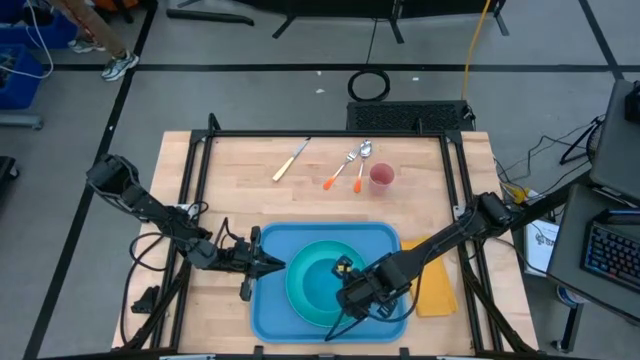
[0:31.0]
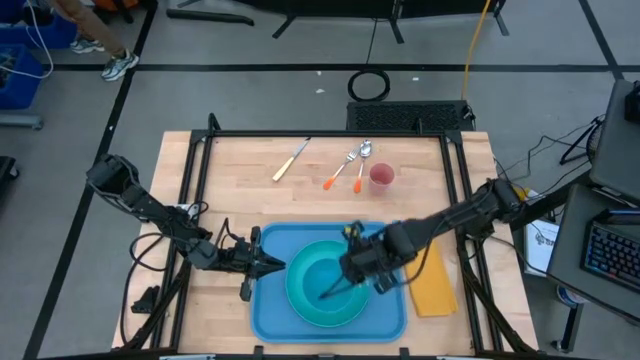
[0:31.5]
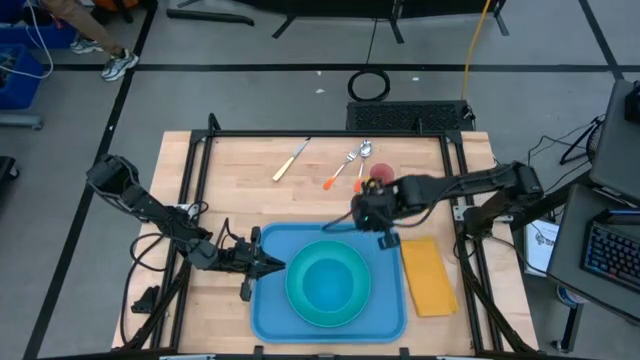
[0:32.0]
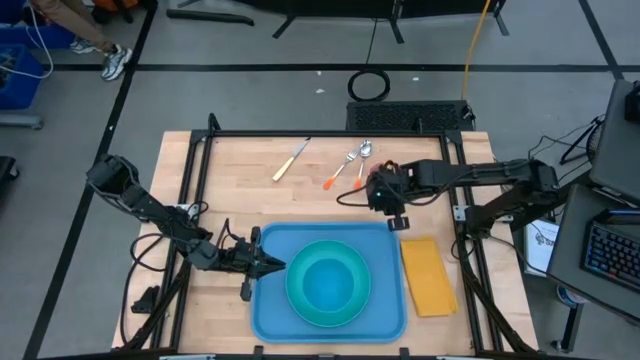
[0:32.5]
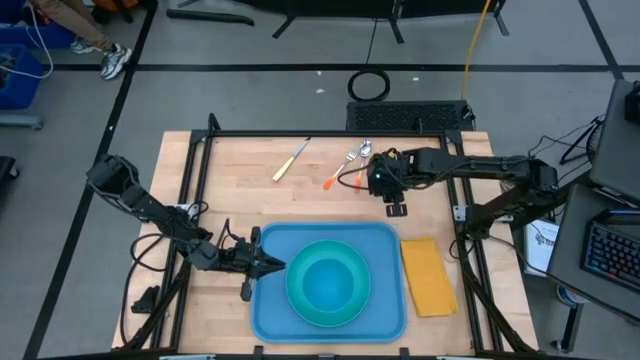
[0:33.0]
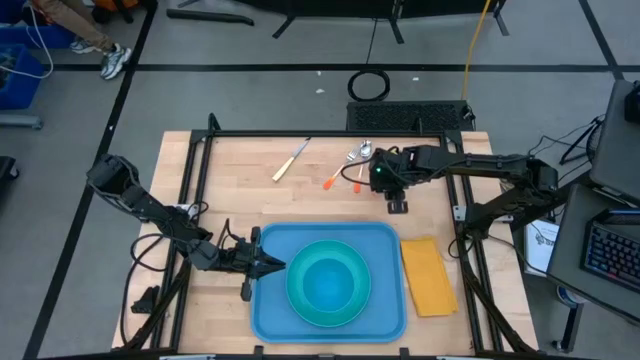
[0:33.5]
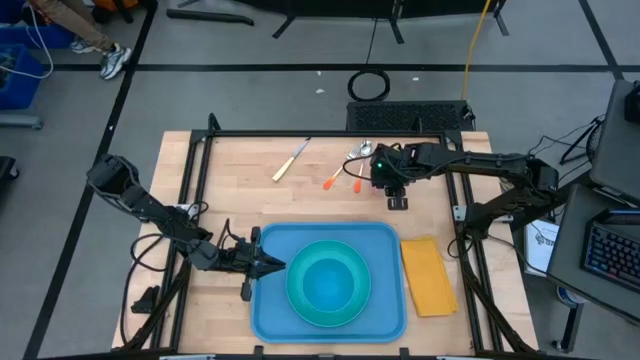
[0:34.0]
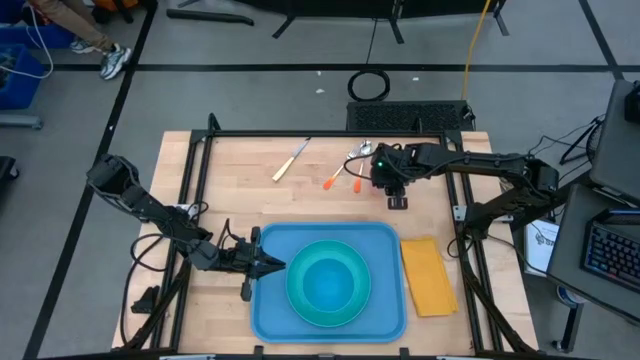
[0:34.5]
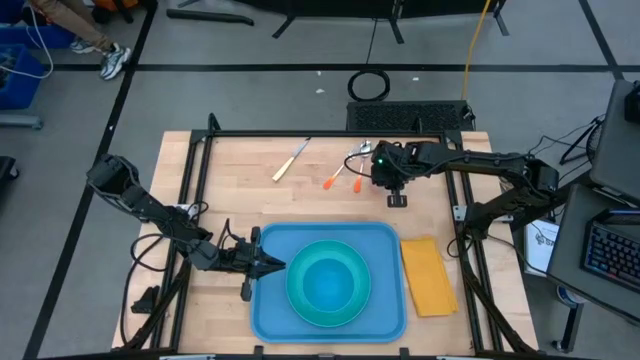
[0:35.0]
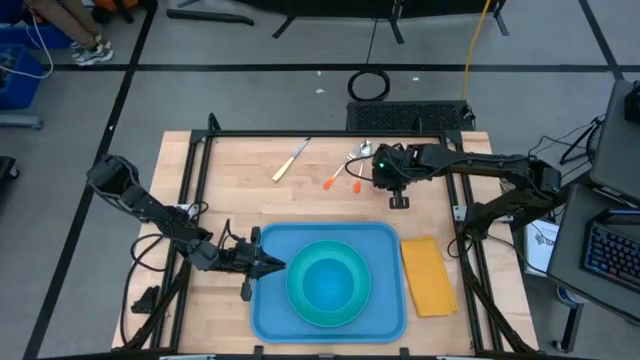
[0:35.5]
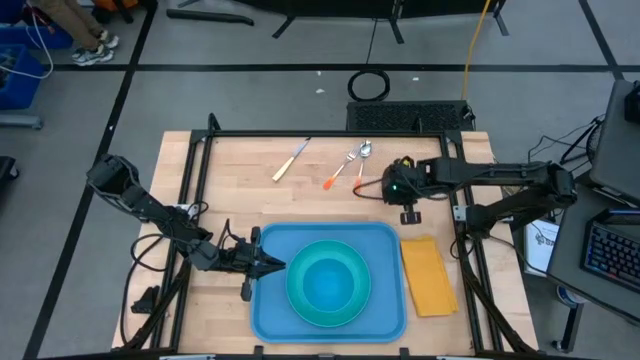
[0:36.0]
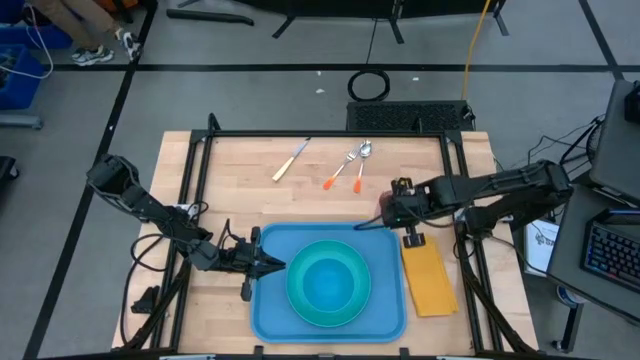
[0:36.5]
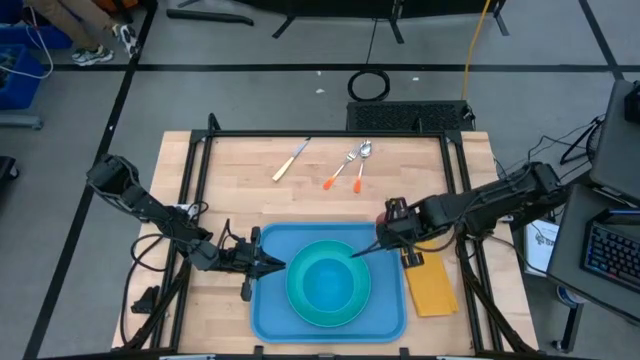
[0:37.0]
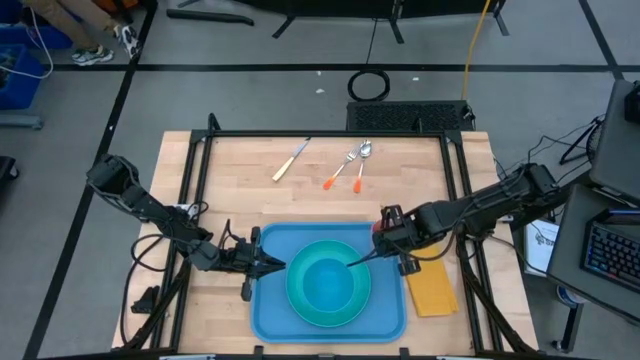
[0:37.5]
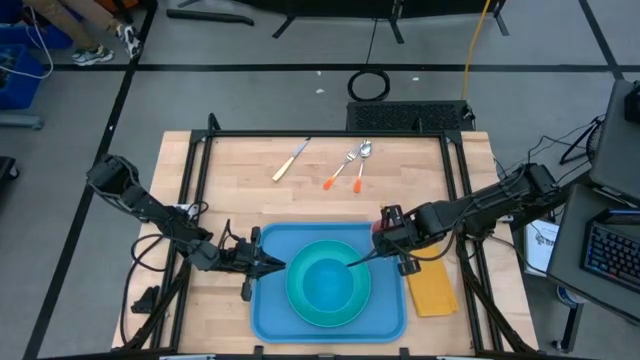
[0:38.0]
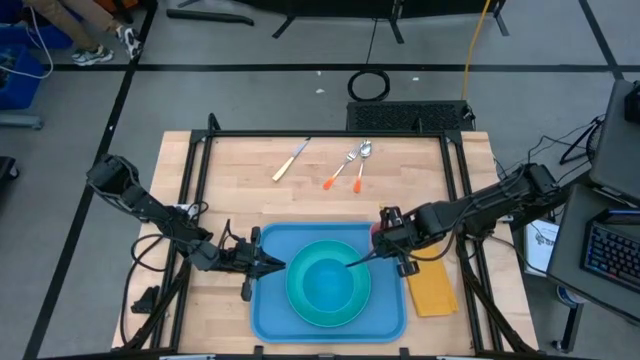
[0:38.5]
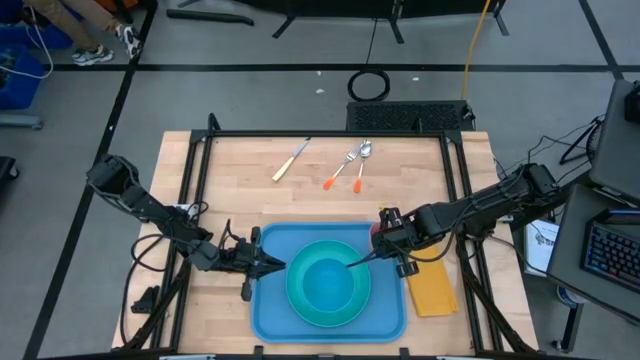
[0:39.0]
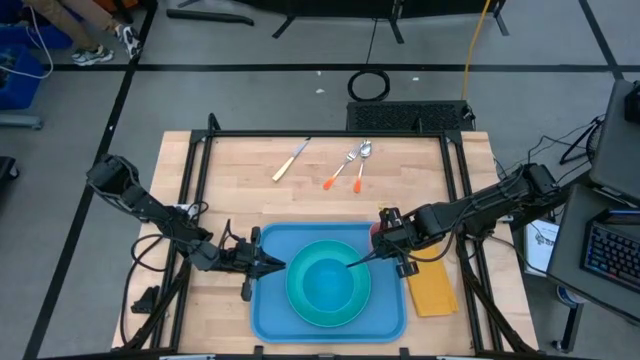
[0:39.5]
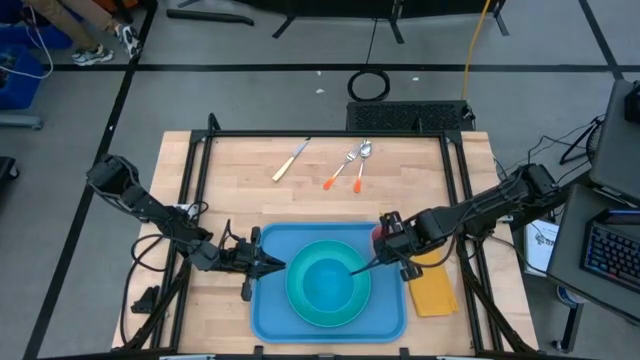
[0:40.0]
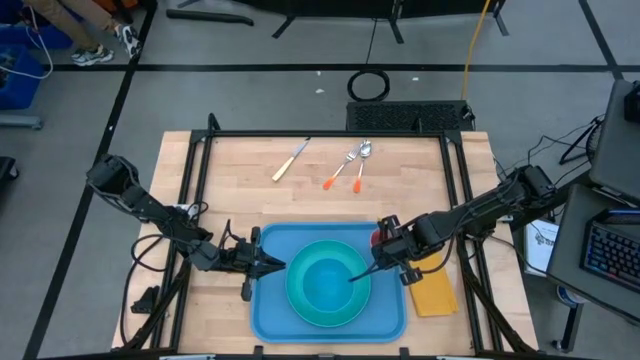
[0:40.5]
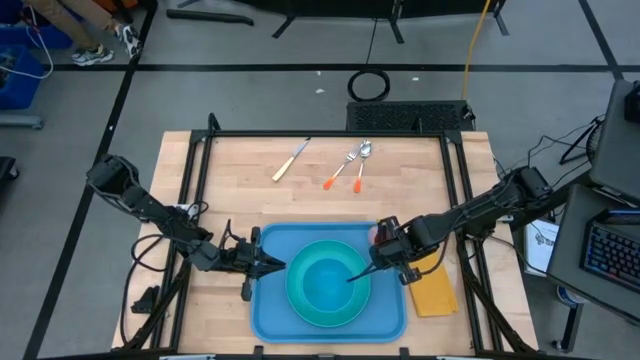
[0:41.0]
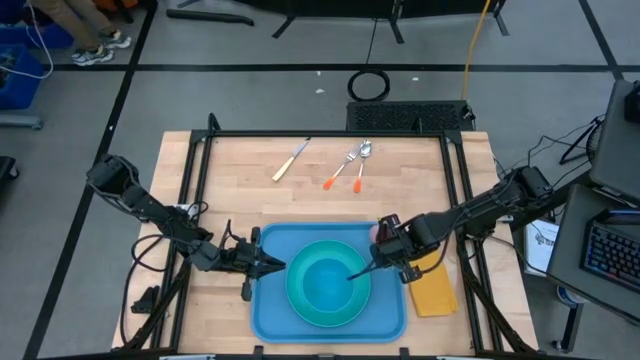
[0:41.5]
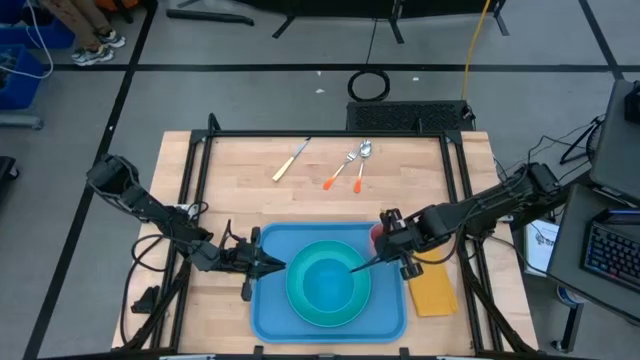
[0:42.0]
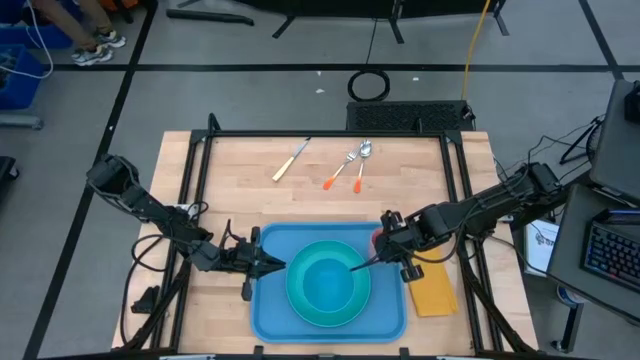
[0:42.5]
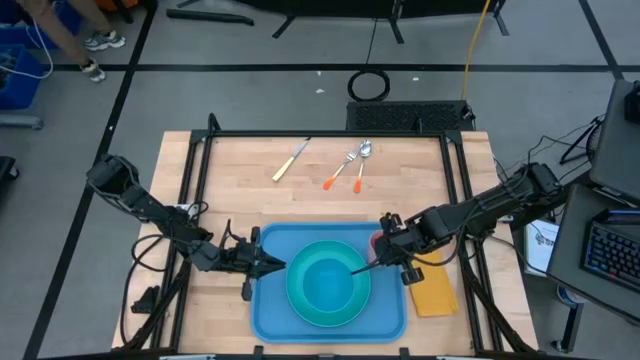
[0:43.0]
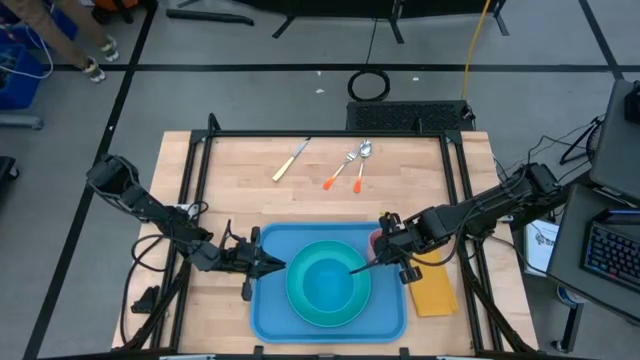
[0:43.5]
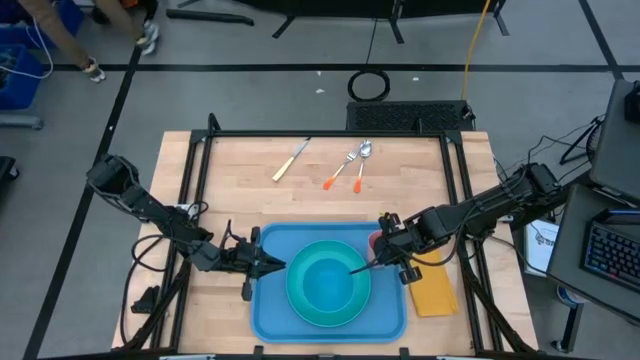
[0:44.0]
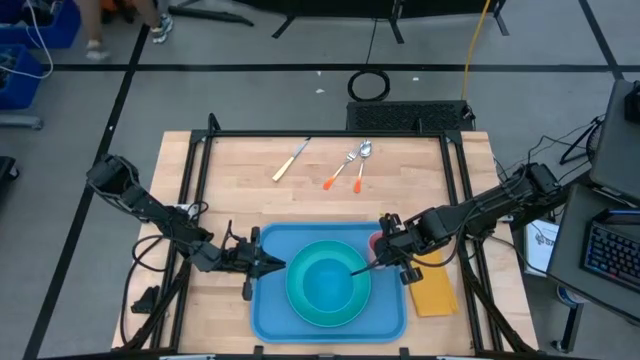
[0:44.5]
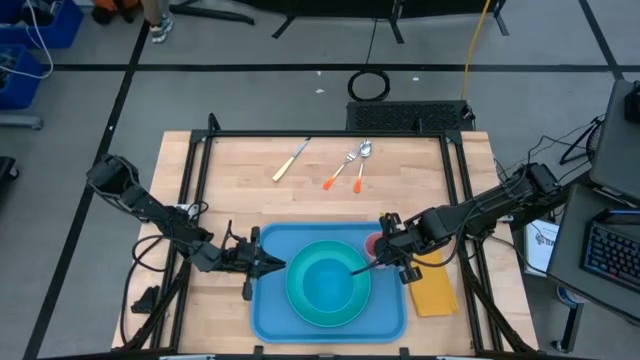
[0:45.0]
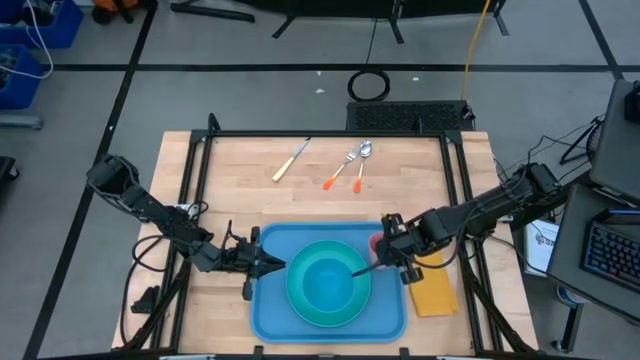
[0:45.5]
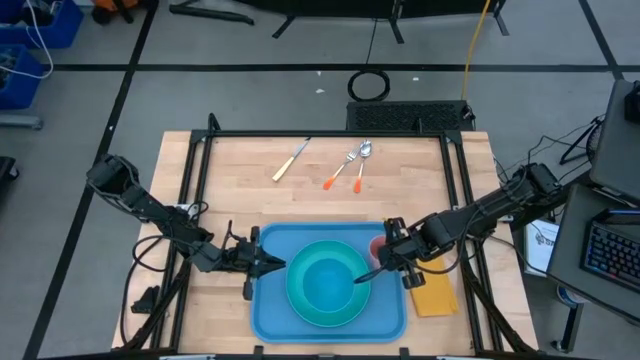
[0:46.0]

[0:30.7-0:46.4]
Task: Set up tray
Put the pink cup on the blue tray to the top right of the light blue plate

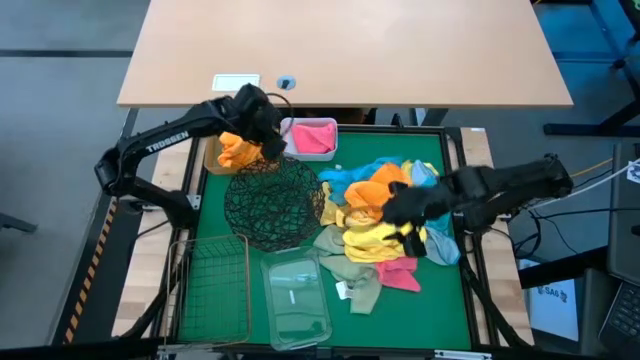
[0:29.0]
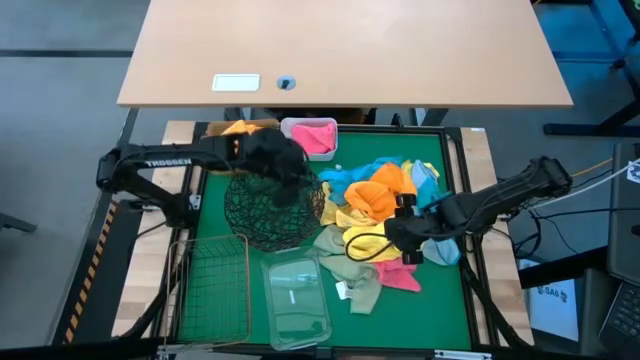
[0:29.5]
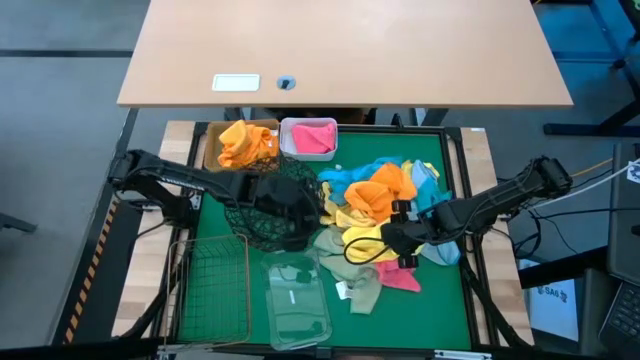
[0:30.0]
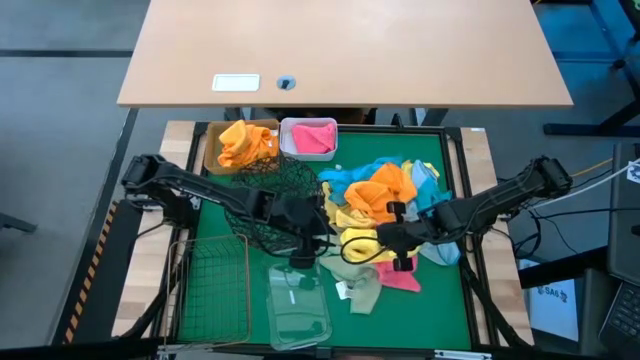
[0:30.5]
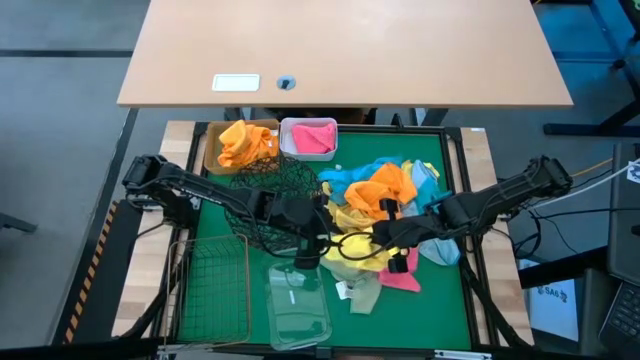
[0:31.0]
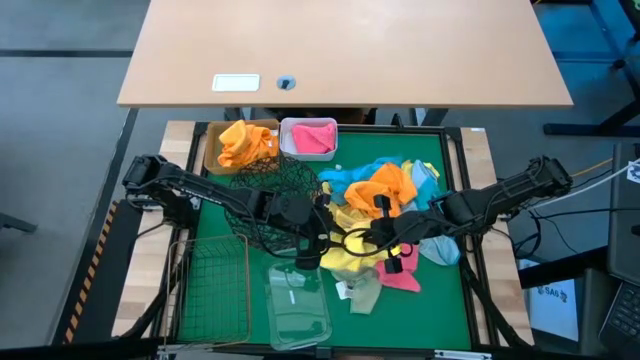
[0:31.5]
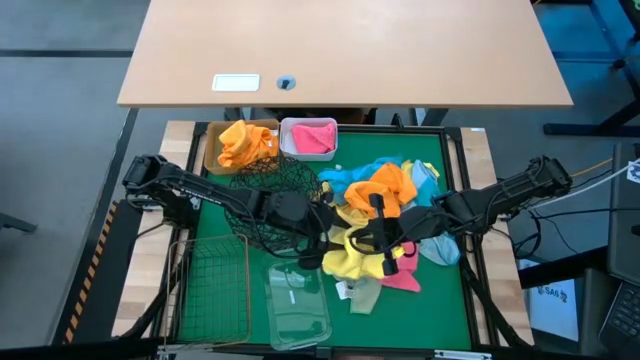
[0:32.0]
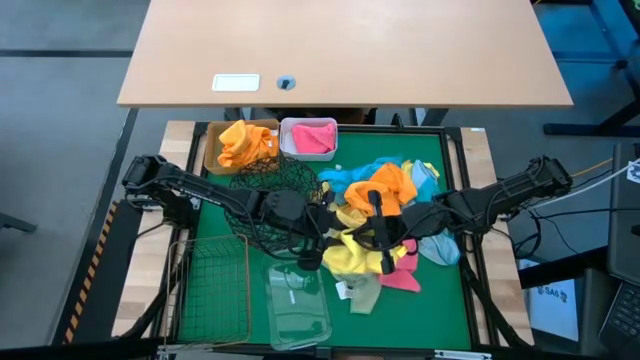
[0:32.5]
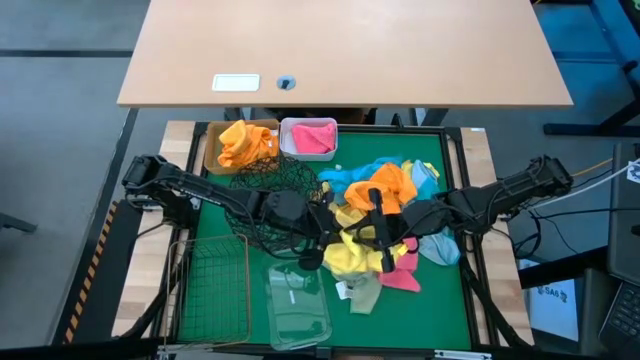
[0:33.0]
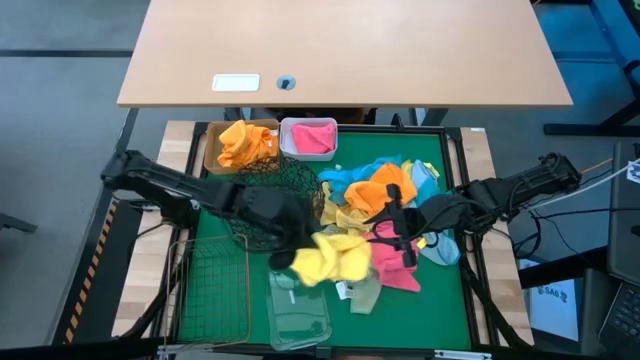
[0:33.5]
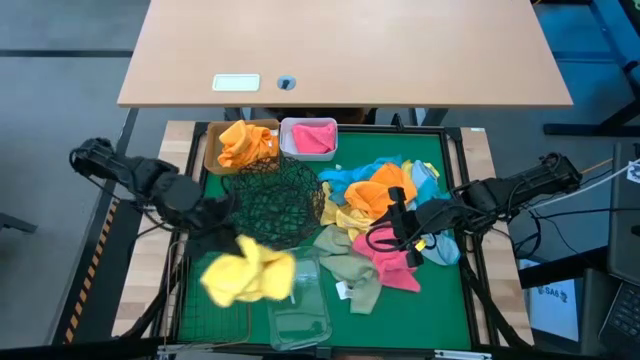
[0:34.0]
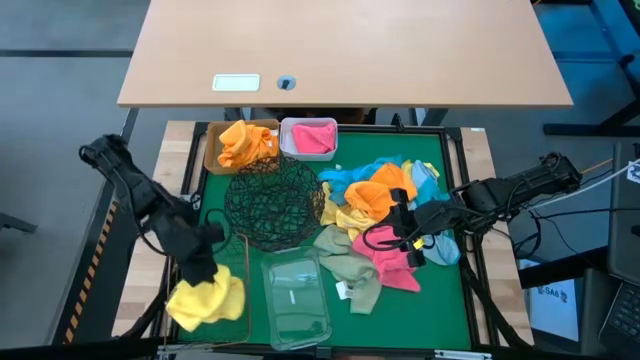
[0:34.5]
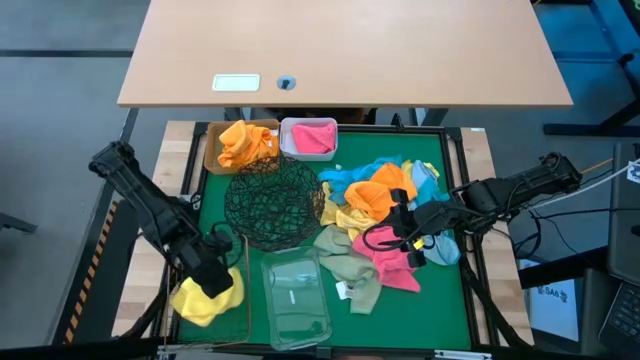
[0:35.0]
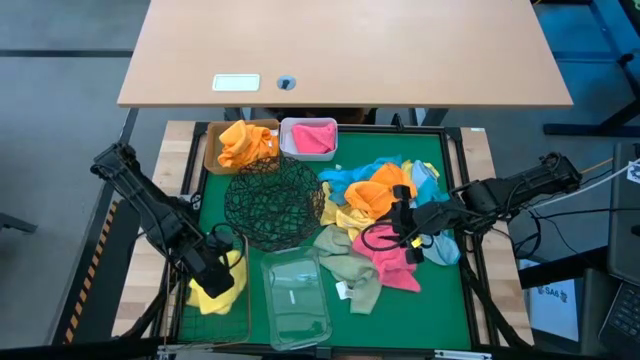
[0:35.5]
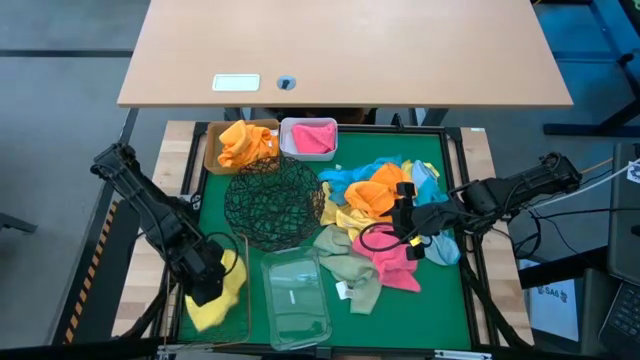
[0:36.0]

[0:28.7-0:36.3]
Task: Sort microfiber towel by color & place in baskets
Put the yellow microfiber towel into the wire basket
